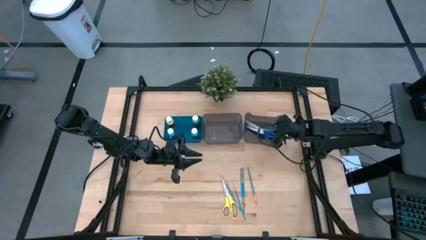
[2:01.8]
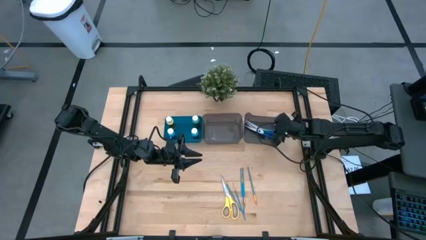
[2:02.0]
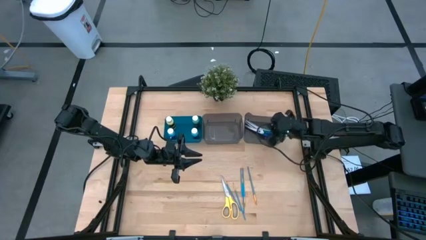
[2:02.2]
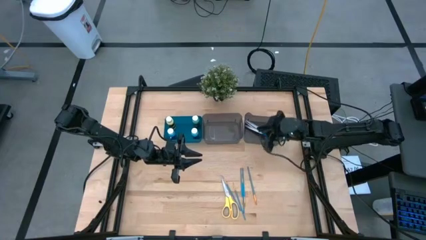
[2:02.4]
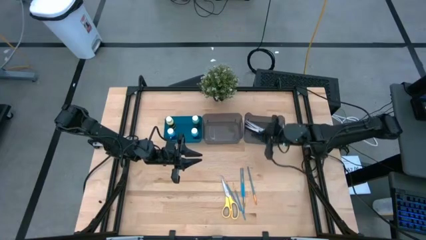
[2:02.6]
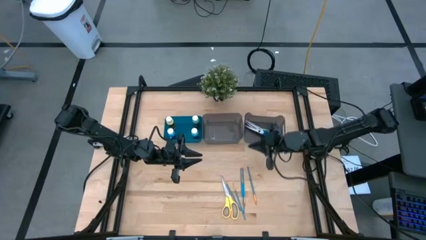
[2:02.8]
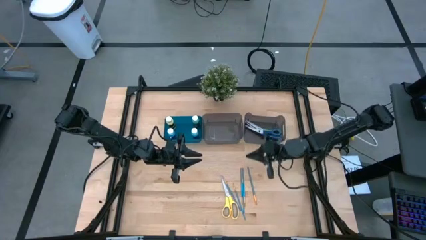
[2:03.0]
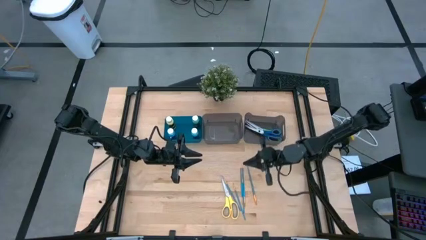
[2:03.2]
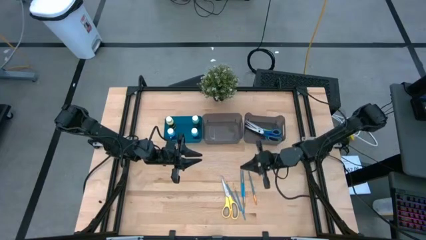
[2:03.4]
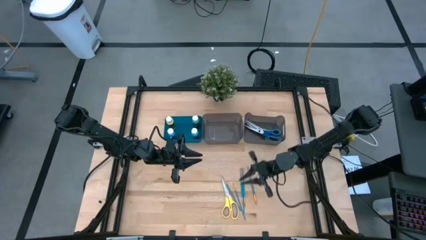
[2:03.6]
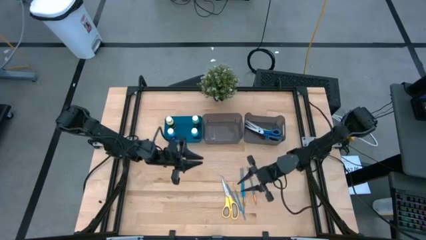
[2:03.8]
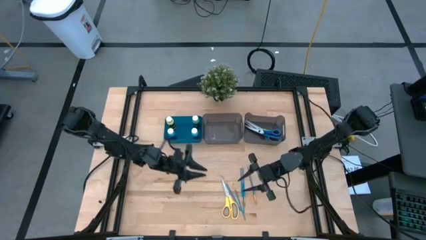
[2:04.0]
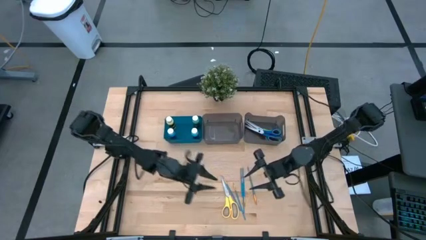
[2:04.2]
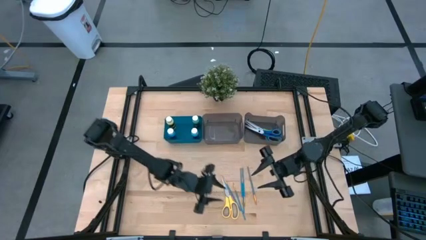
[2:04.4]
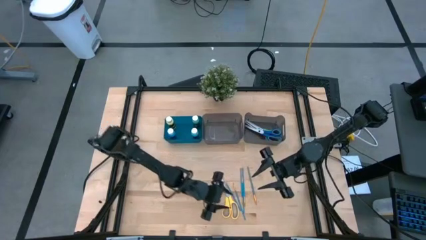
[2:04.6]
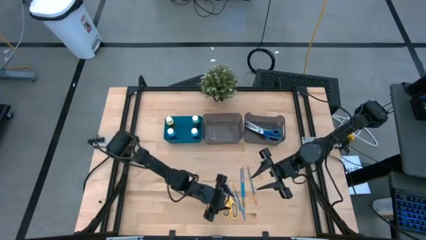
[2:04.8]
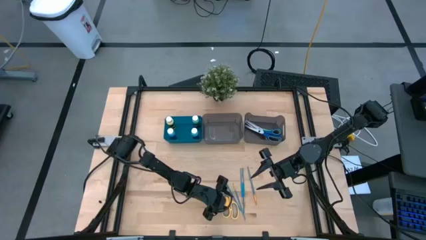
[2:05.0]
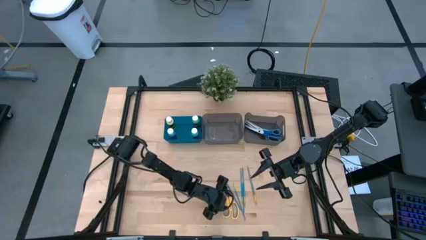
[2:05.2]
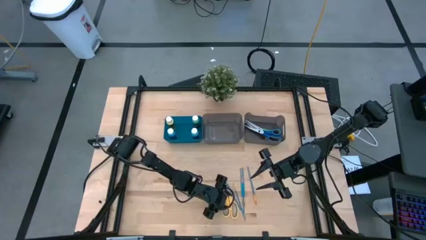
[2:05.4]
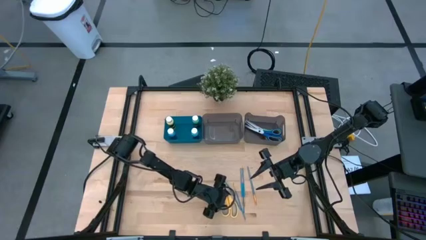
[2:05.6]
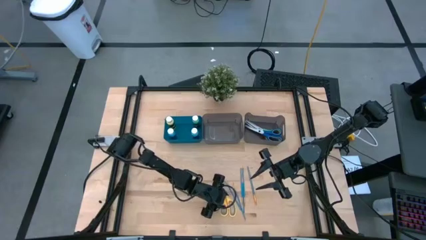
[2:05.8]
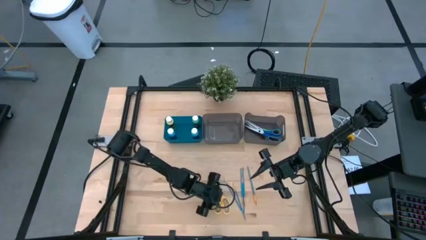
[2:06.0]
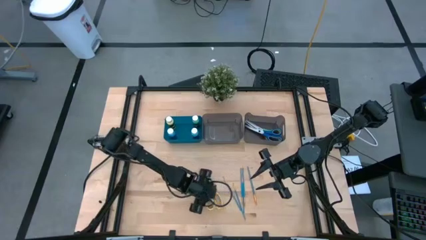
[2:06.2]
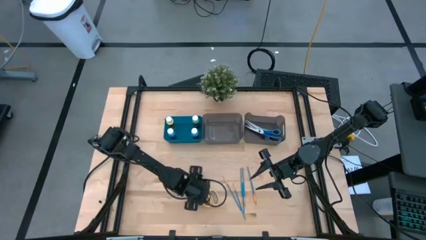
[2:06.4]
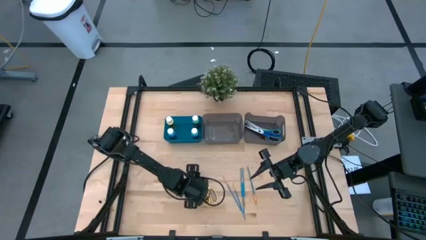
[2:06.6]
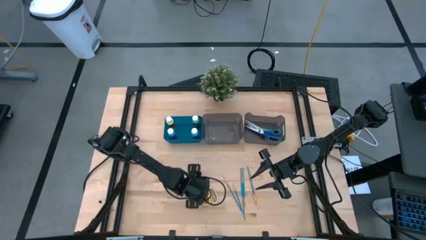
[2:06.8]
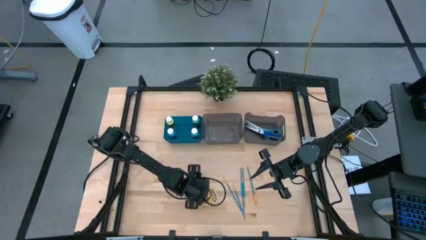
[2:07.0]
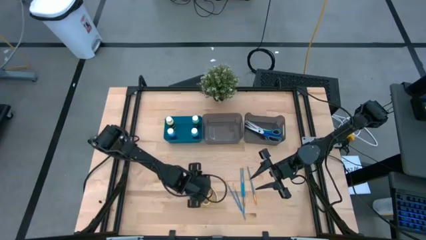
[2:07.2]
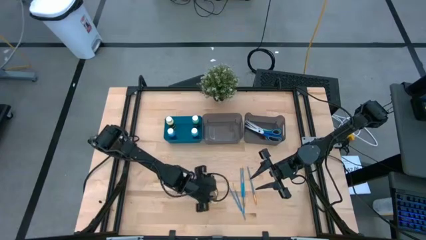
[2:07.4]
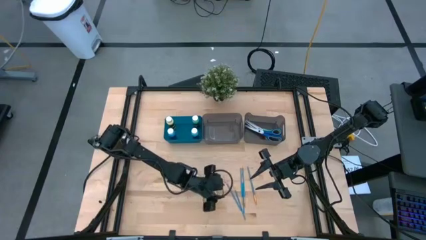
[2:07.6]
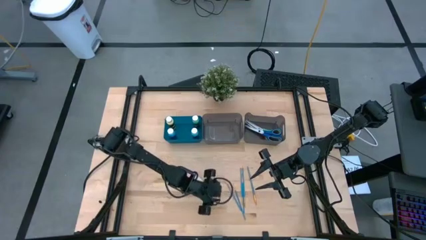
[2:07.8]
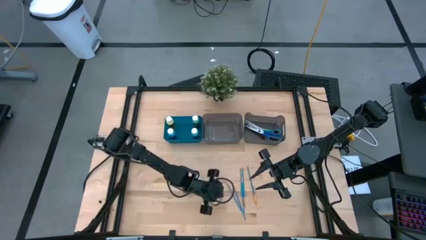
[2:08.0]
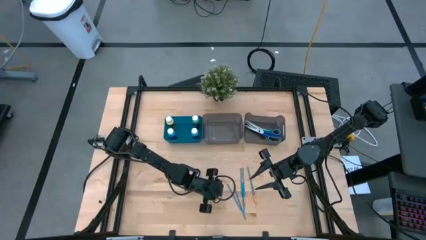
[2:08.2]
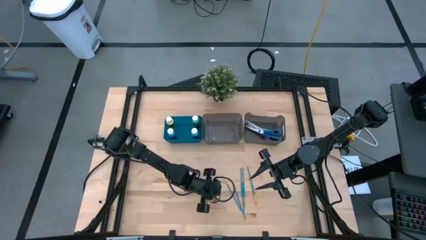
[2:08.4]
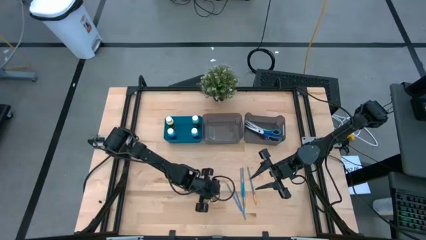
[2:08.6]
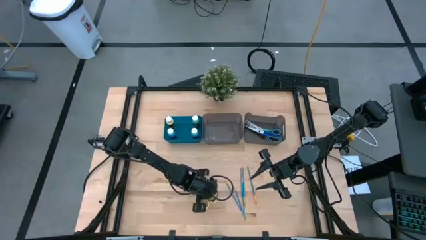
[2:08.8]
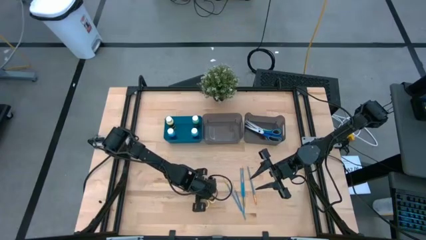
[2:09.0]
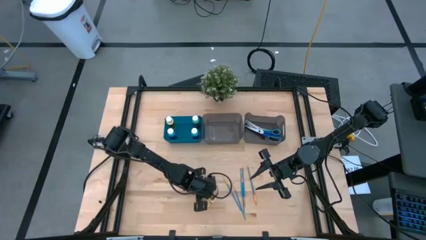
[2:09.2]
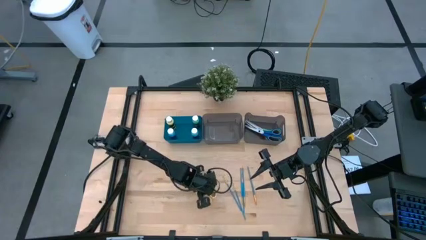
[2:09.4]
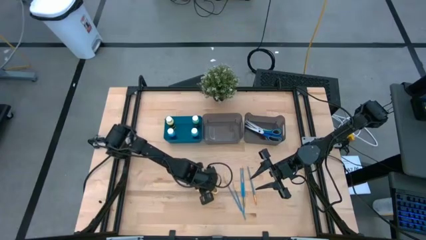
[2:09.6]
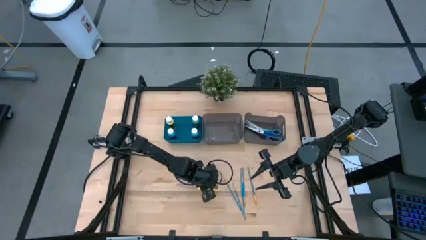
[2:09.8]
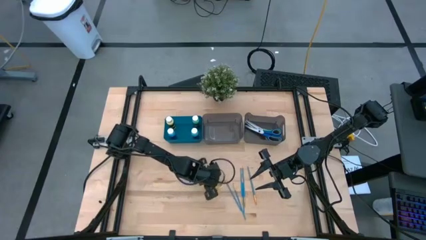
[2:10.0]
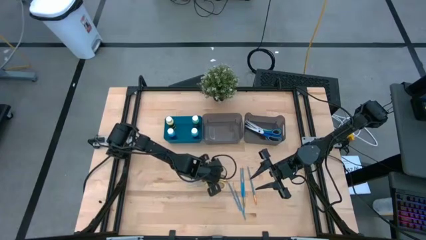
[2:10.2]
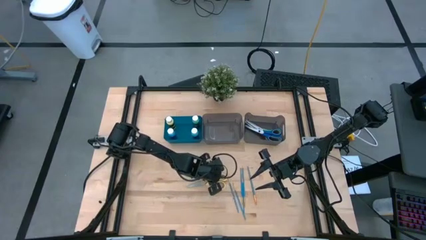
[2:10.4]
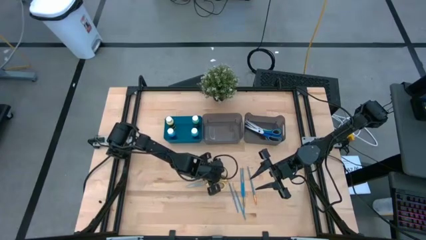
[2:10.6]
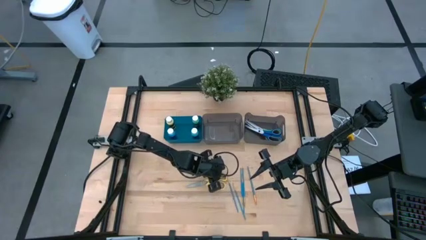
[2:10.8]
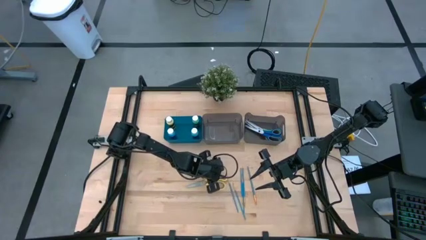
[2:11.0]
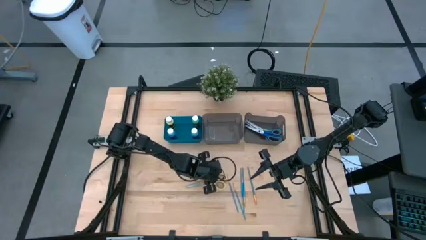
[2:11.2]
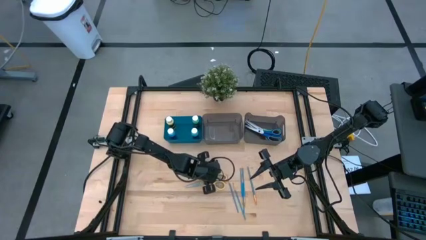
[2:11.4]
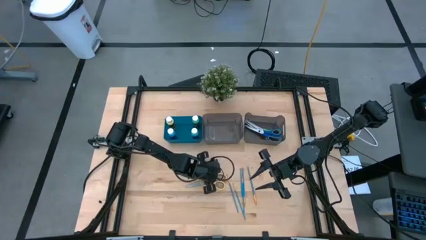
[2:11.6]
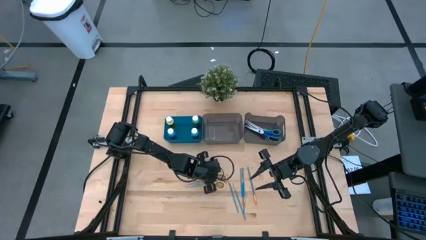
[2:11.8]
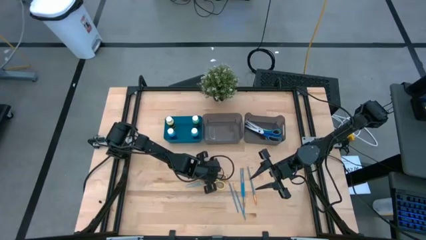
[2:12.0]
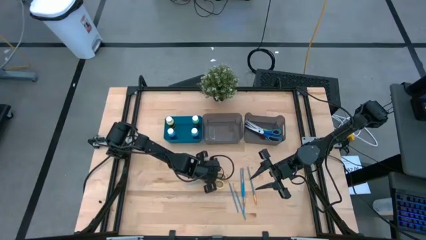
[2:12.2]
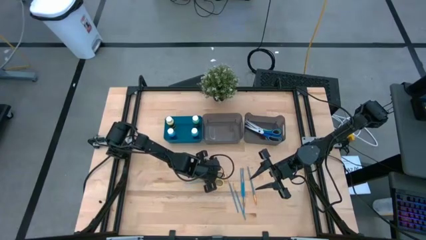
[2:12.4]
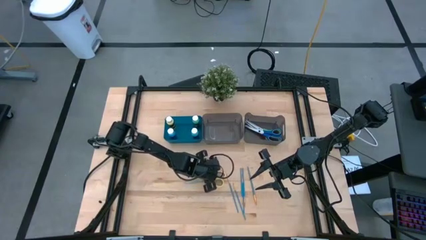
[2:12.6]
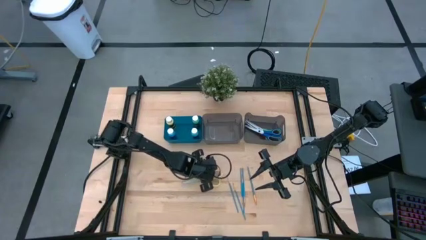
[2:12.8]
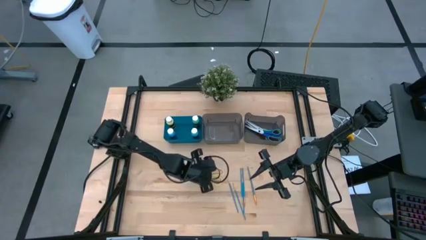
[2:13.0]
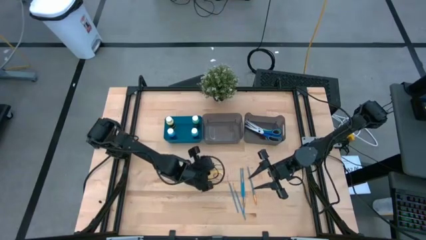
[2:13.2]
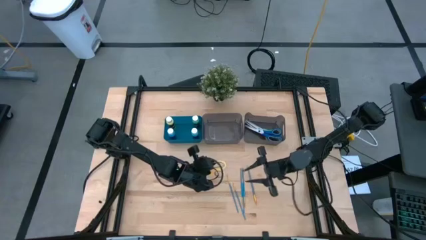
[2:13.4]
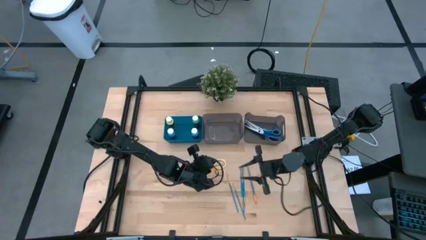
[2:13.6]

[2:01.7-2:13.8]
Task: Pick & Place Paint Supplies
Put the yellow scissor into the right black bin
